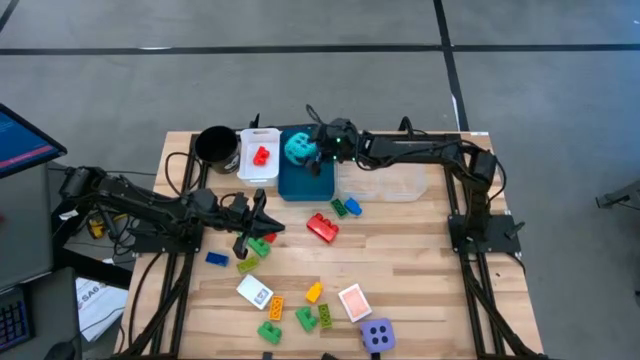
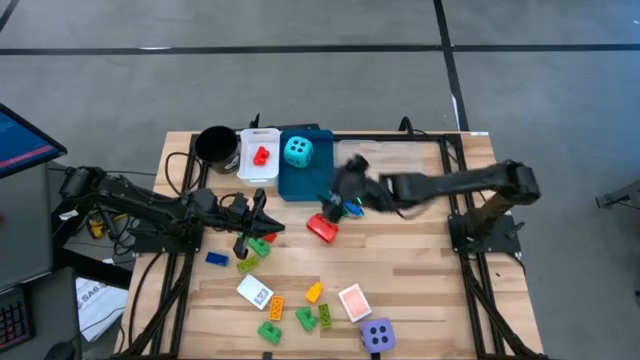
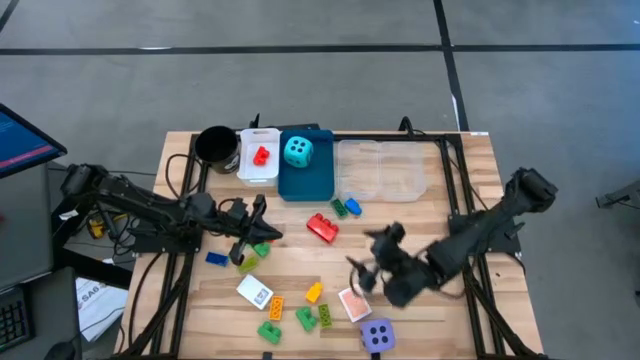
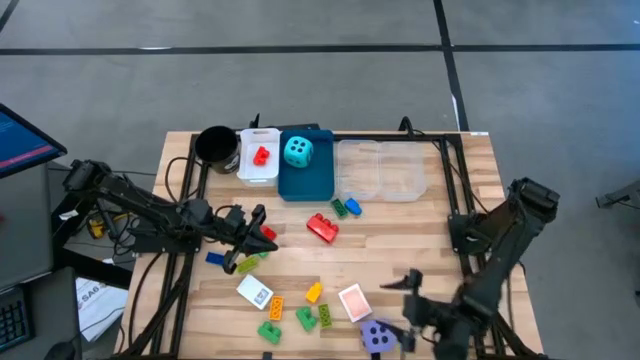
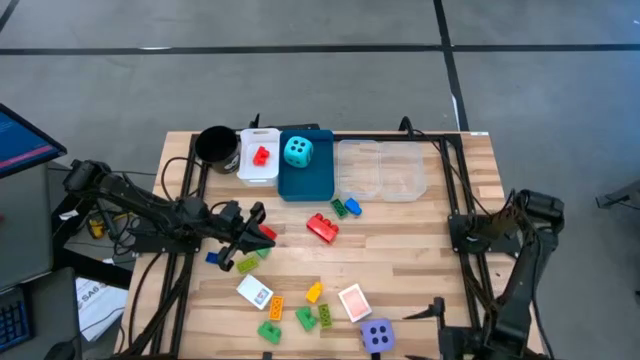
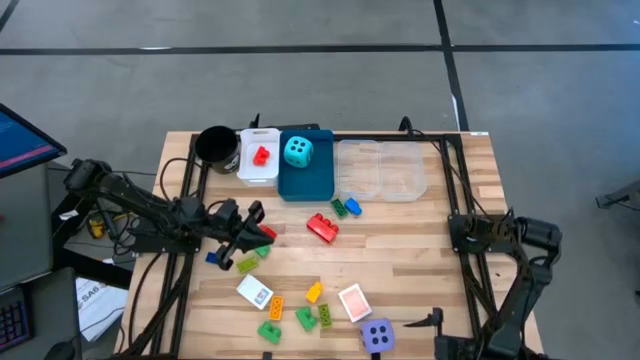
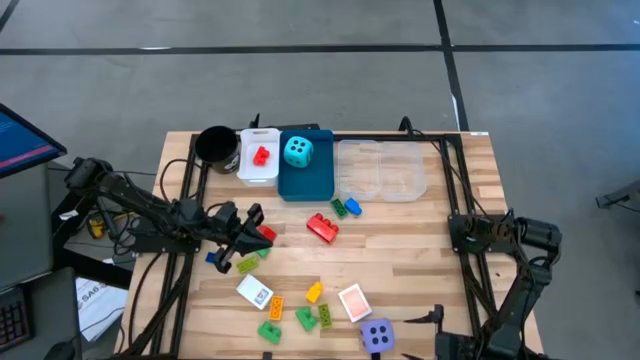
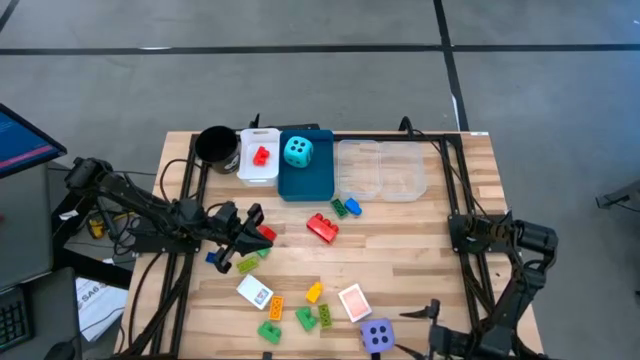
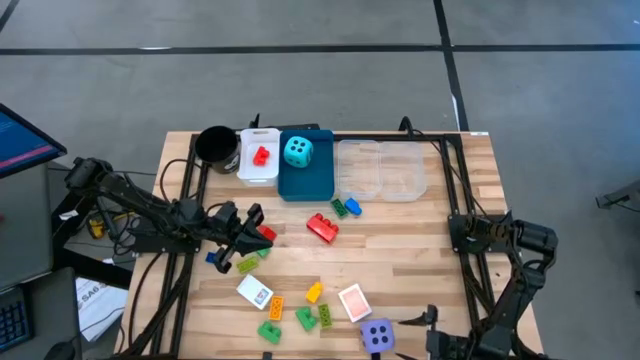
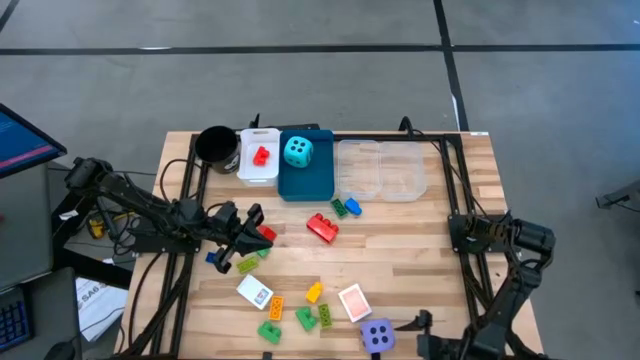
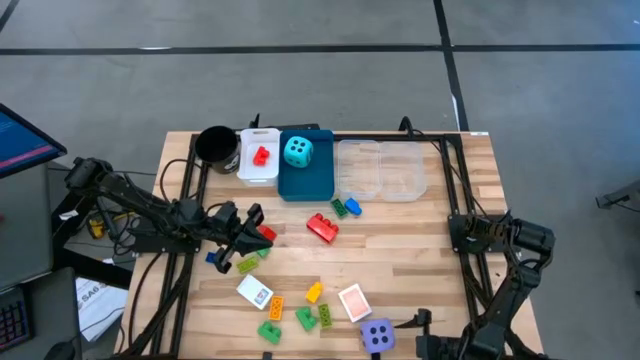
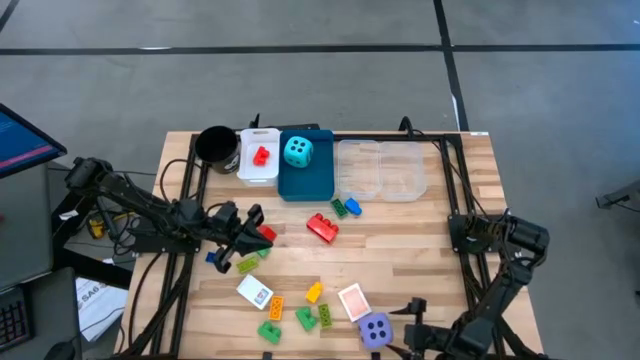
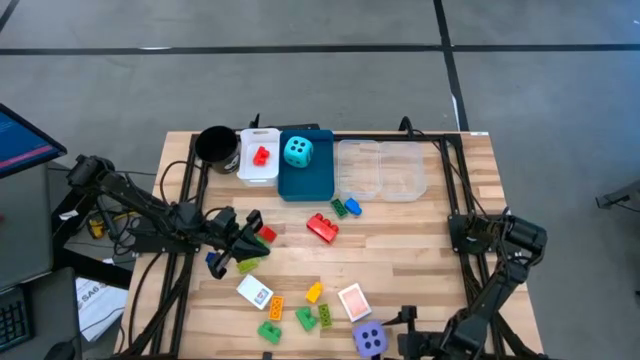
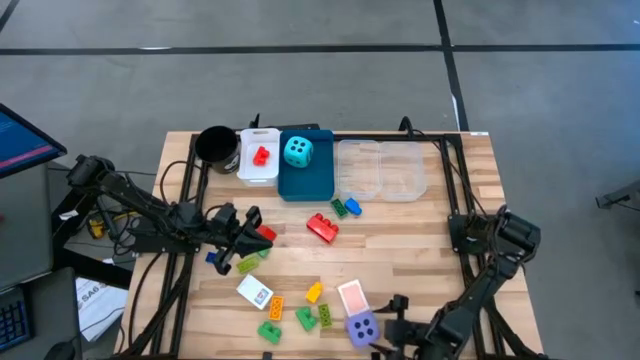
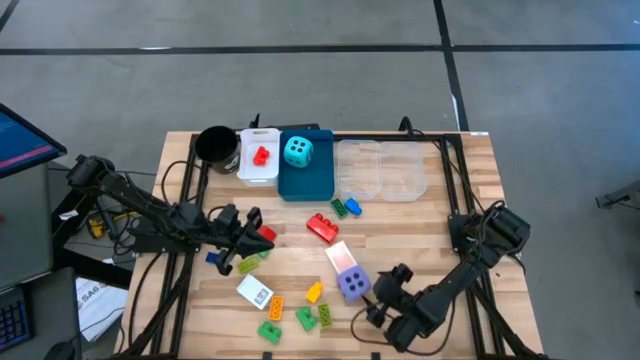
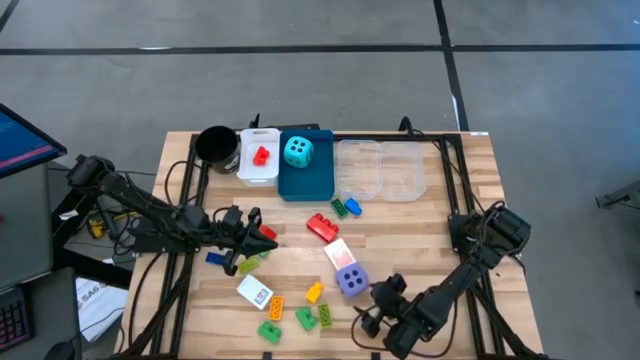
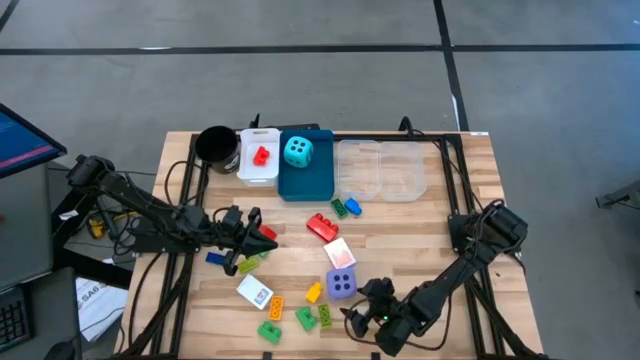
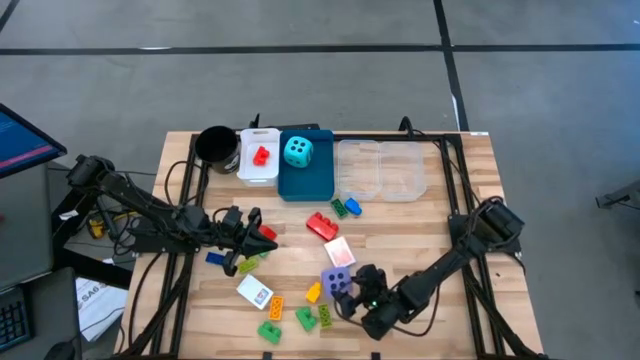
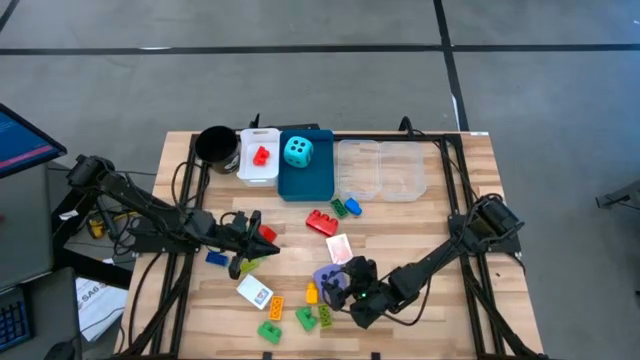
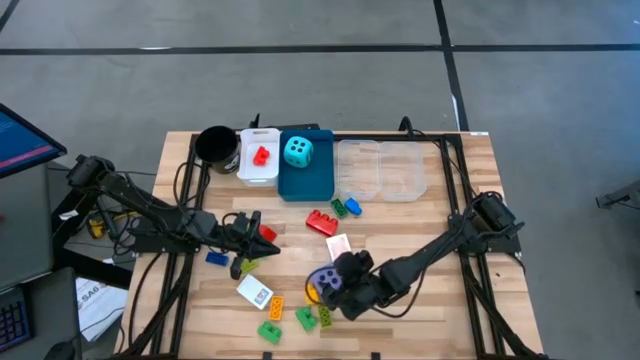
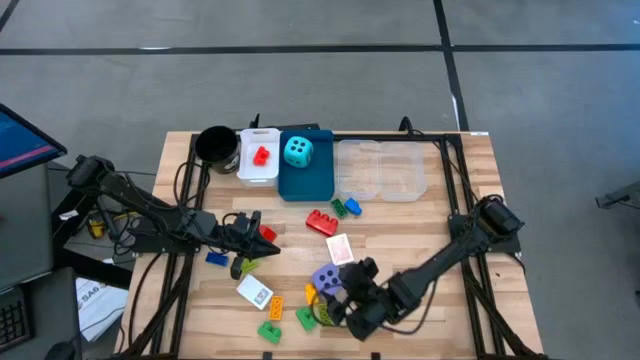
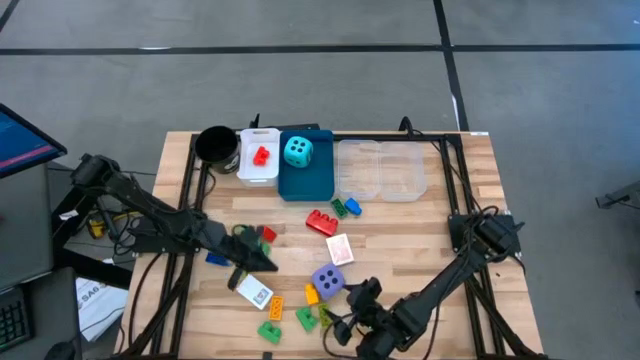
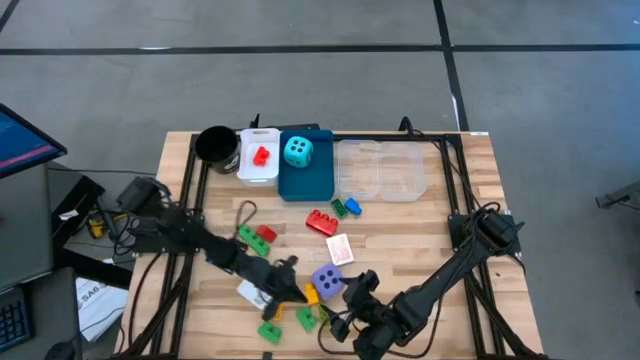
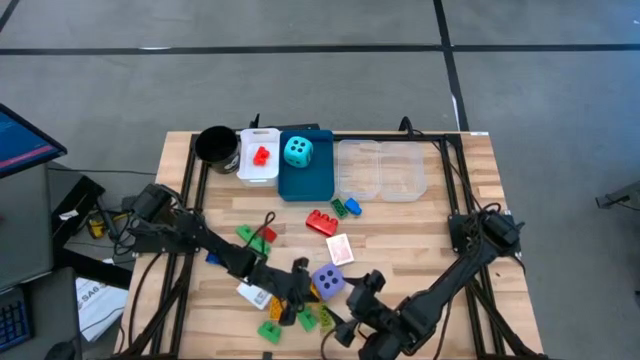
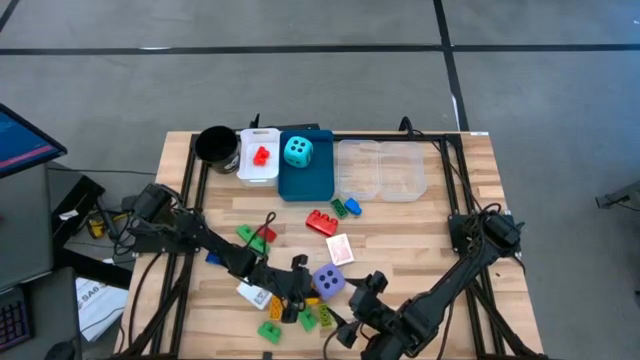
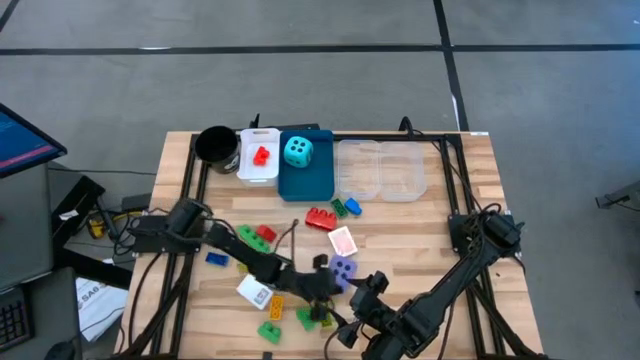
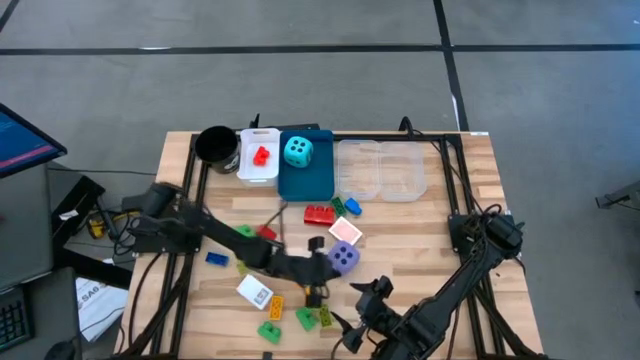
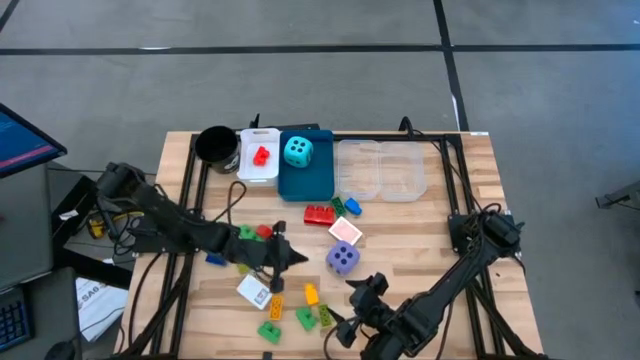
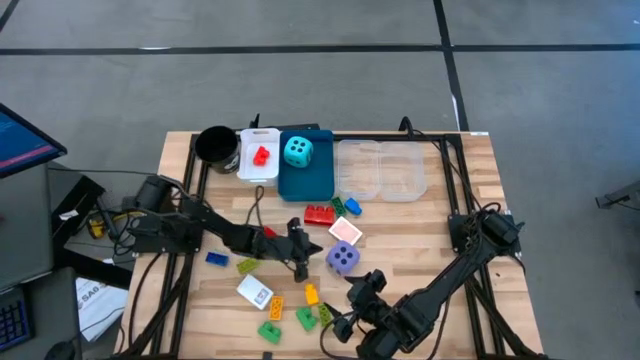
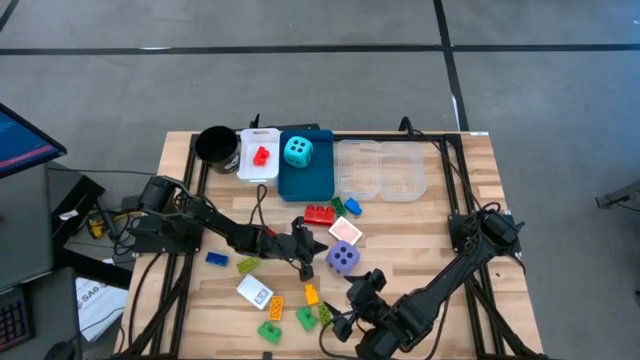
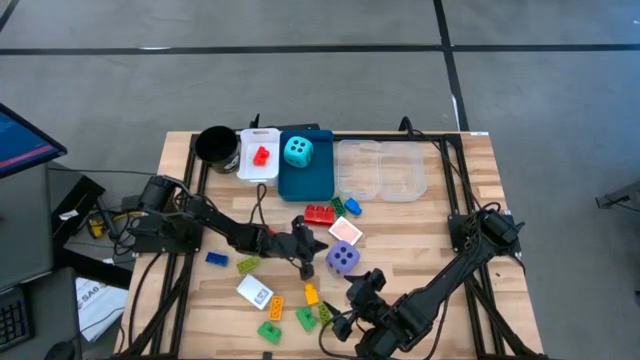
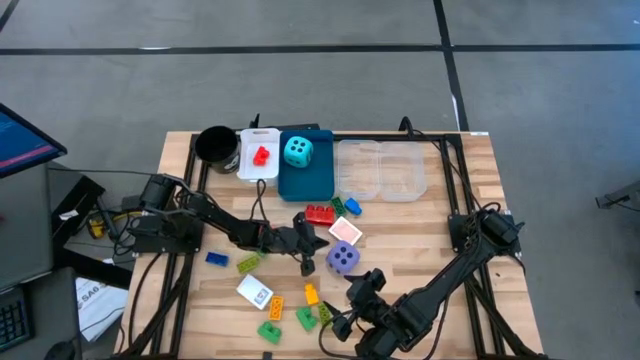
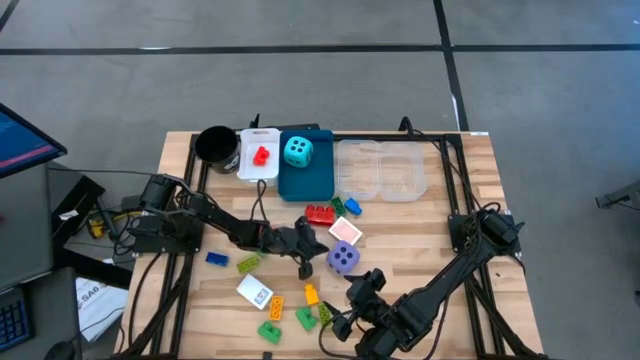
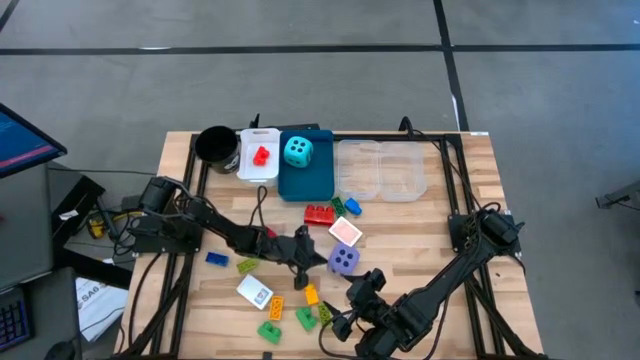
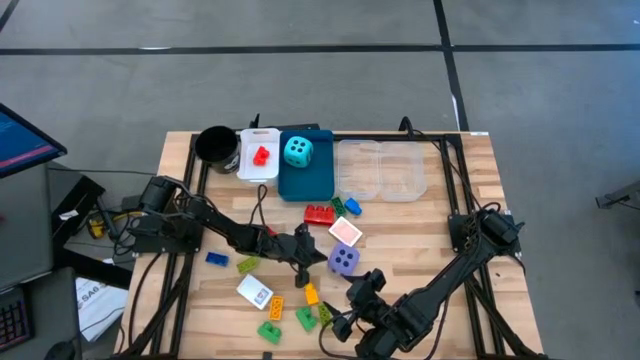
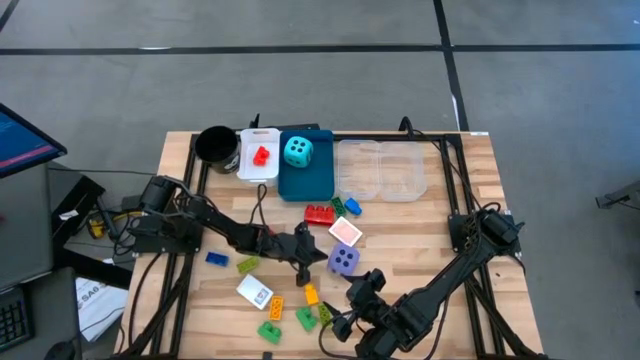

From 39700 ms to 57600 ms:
Task: Pick & Place Toys
Put the violet dice into the blue bin

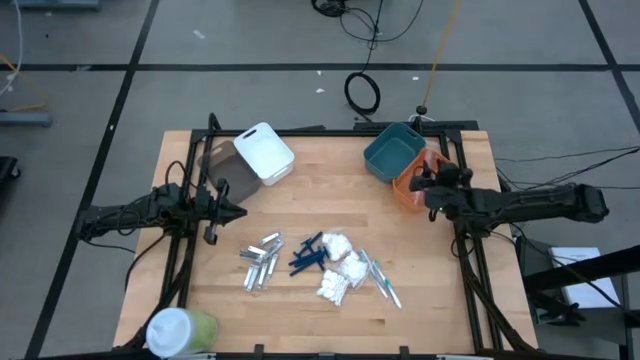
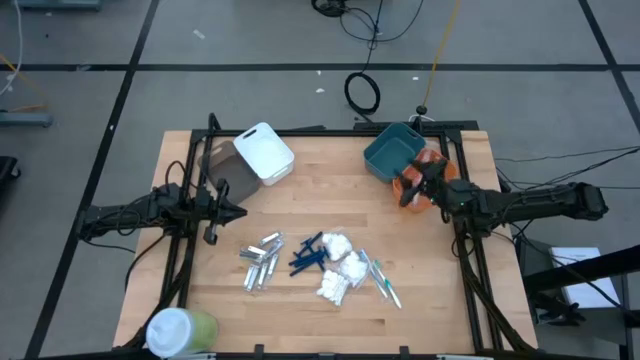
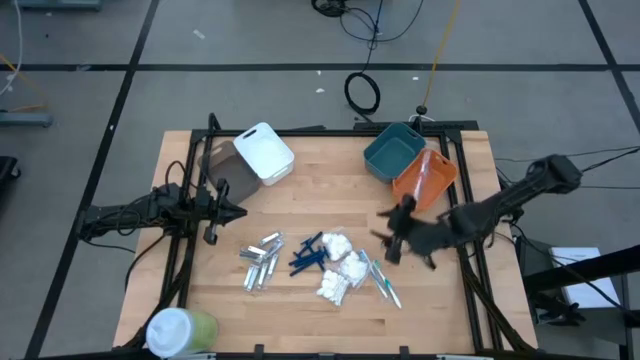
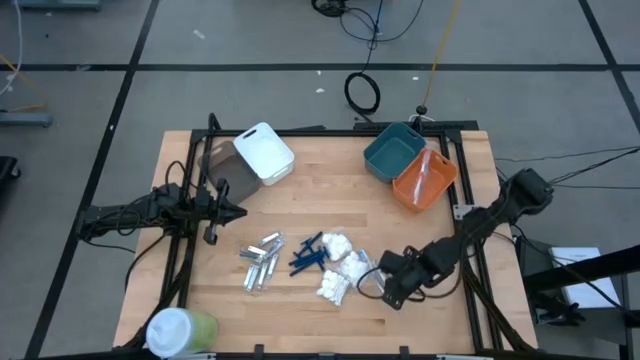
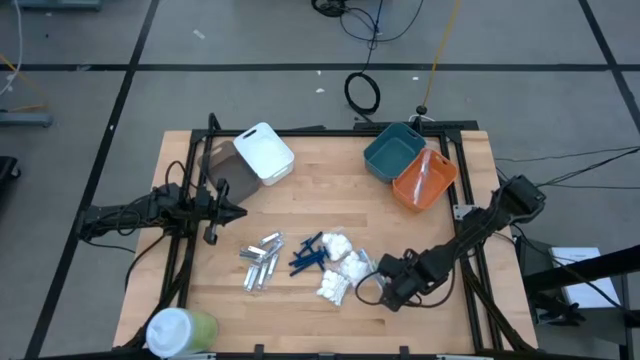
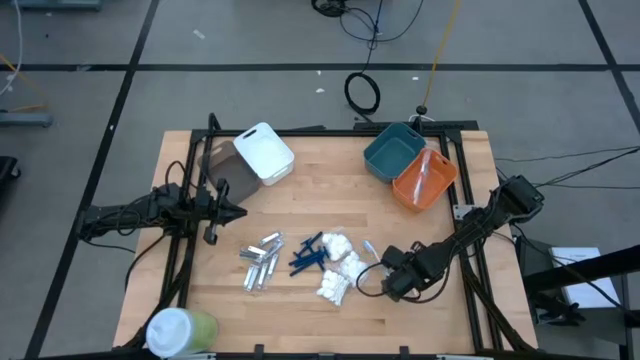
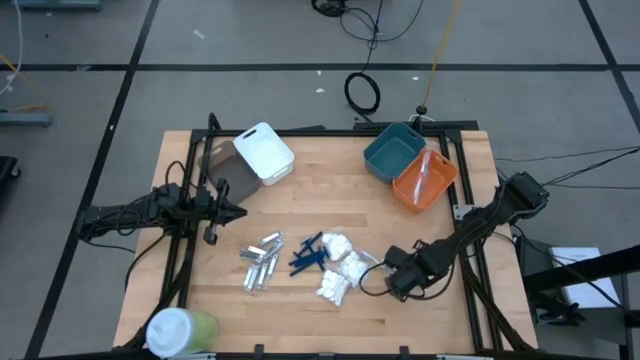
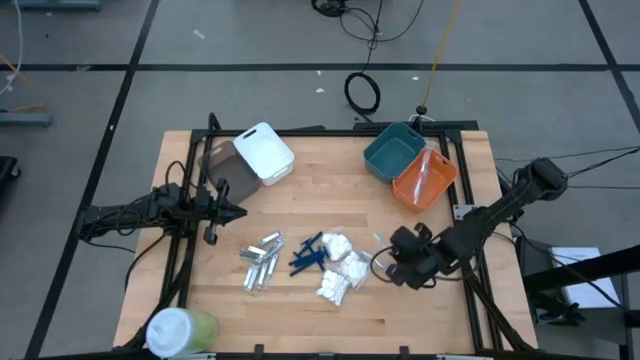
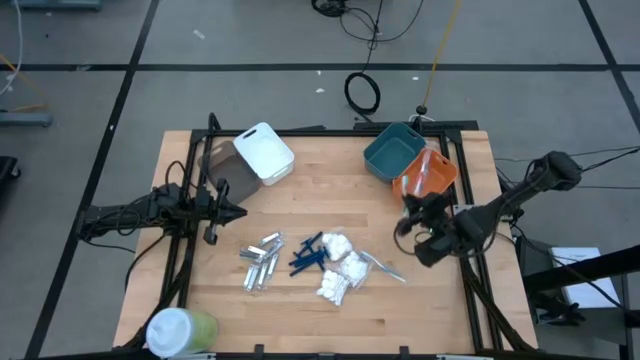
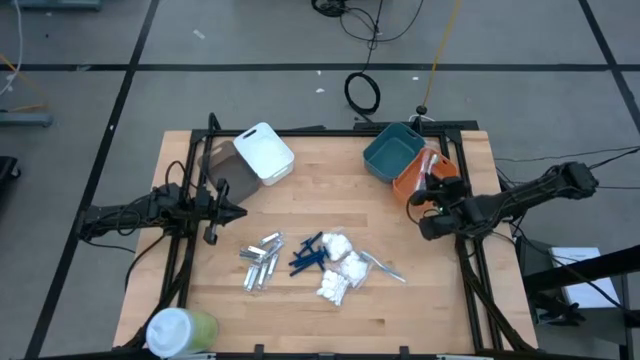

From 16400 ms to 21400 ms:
Task: Pick & Place Travel size toiletries
Put the green toothbrush into the orange bin
